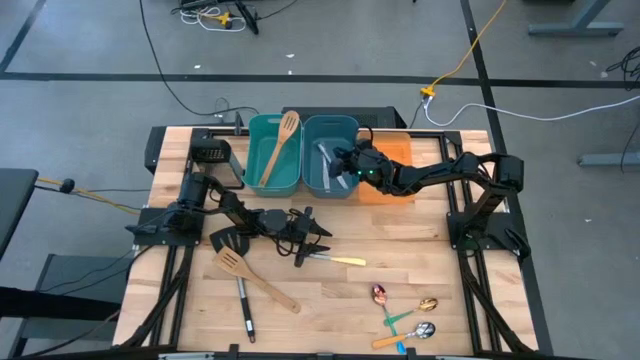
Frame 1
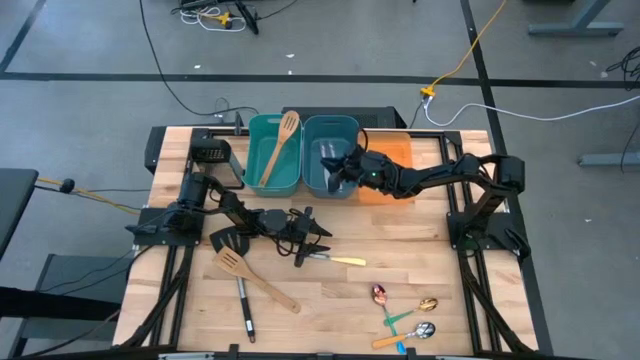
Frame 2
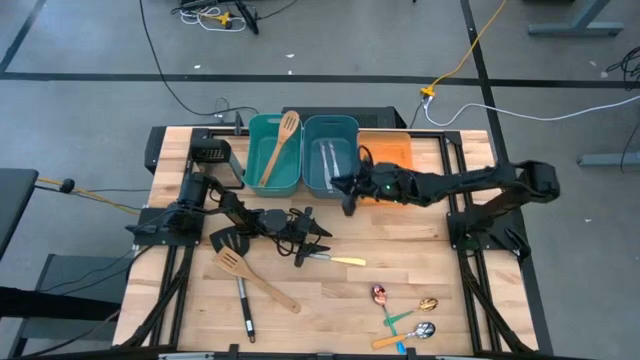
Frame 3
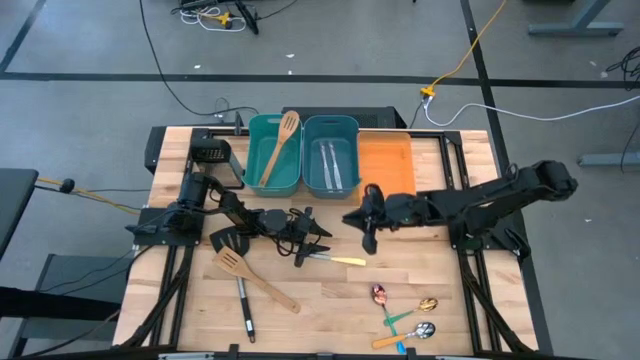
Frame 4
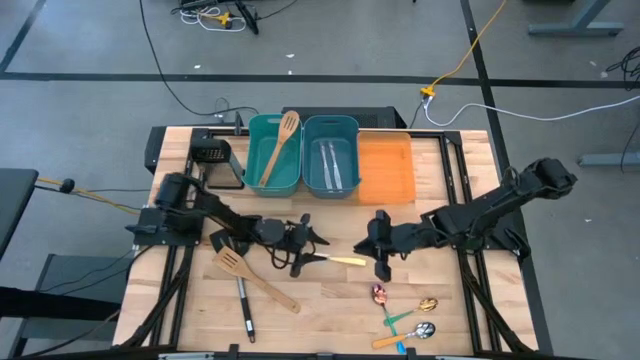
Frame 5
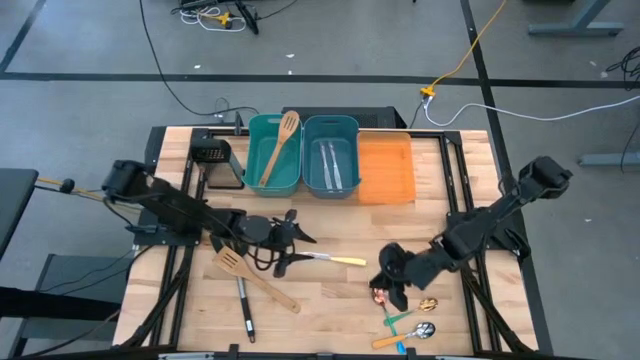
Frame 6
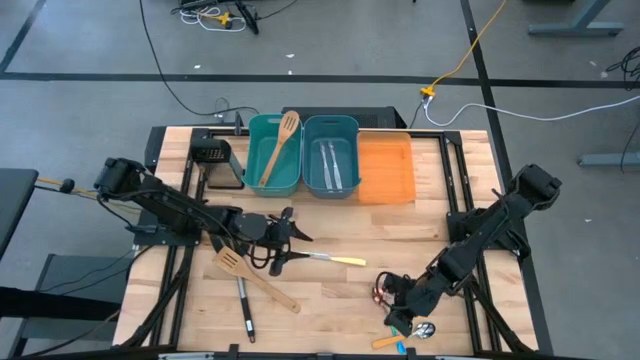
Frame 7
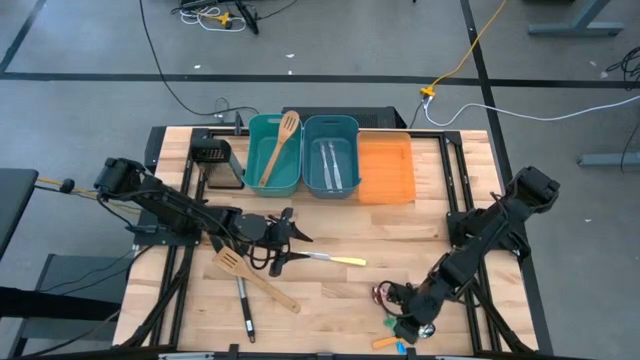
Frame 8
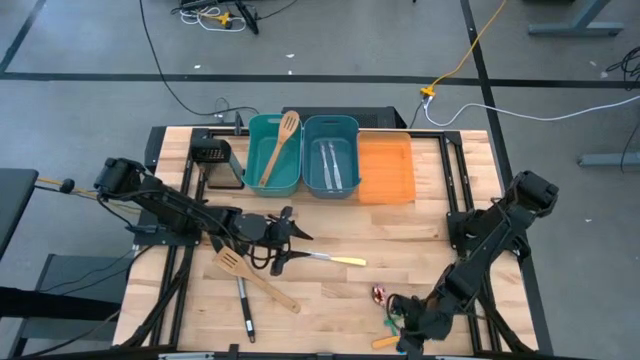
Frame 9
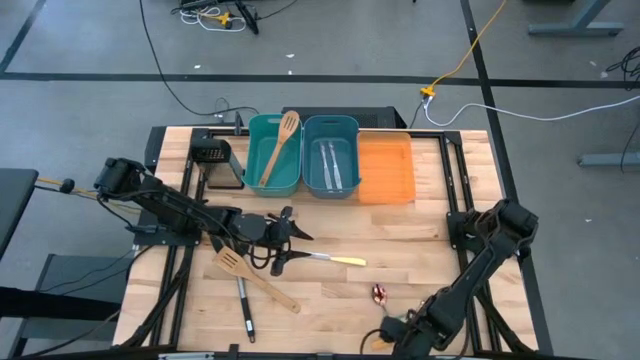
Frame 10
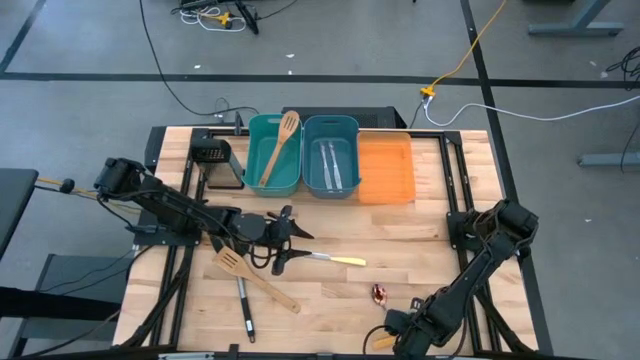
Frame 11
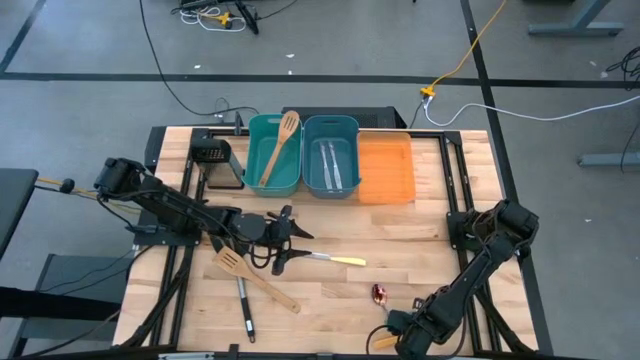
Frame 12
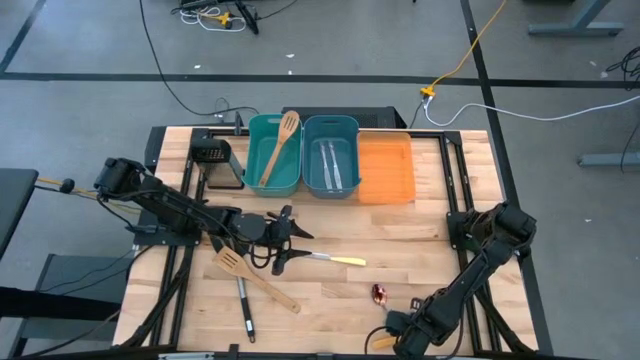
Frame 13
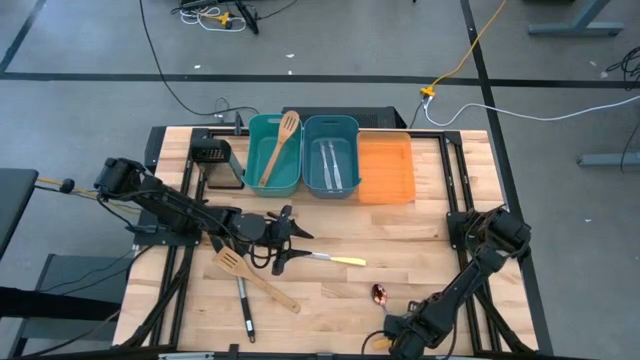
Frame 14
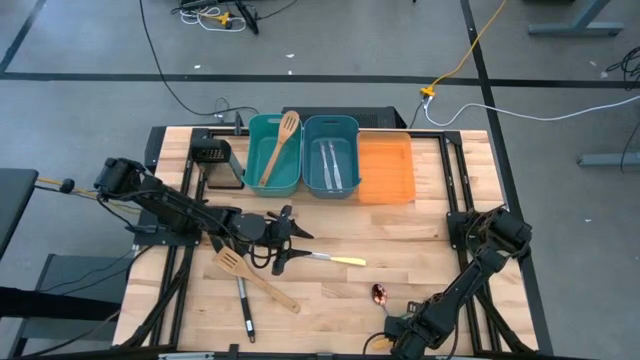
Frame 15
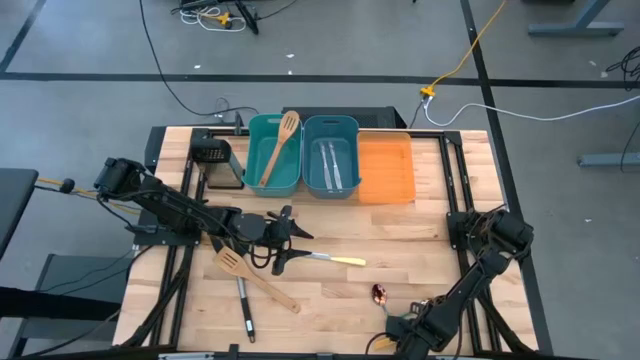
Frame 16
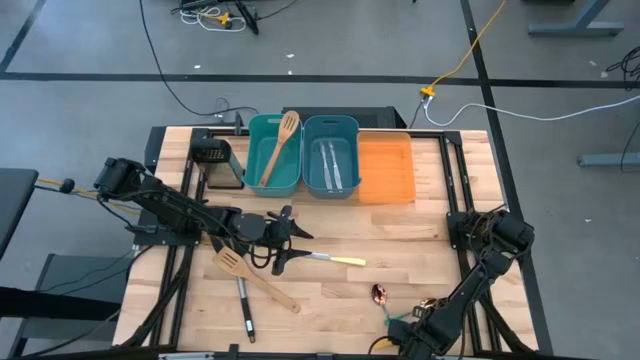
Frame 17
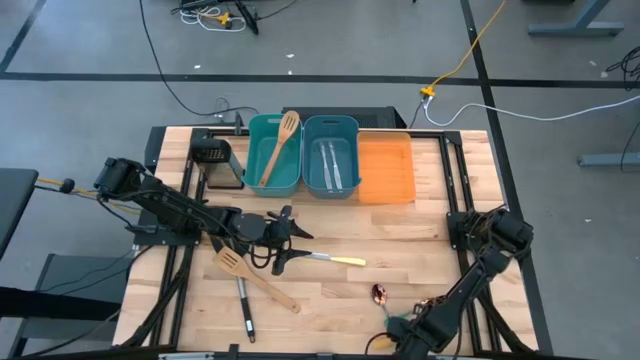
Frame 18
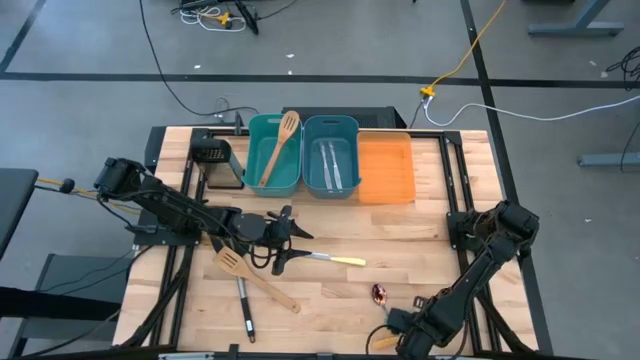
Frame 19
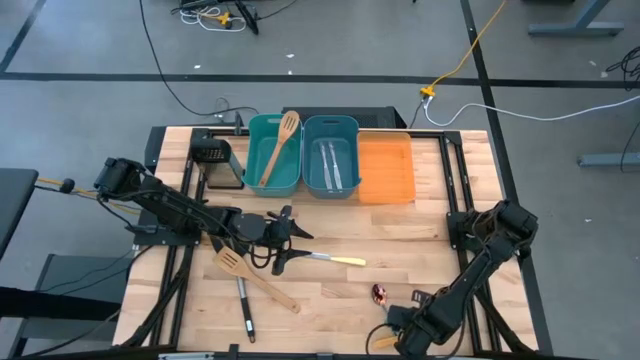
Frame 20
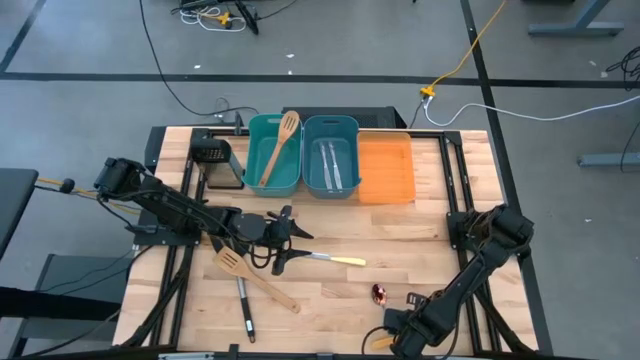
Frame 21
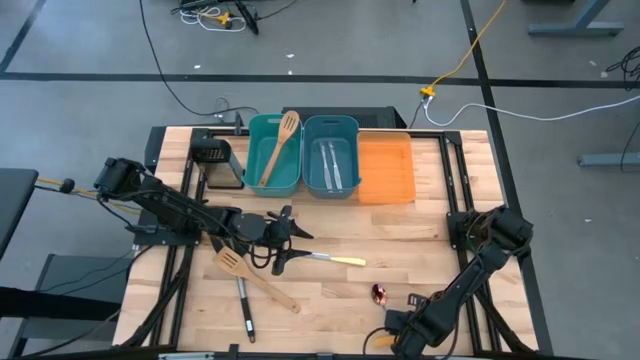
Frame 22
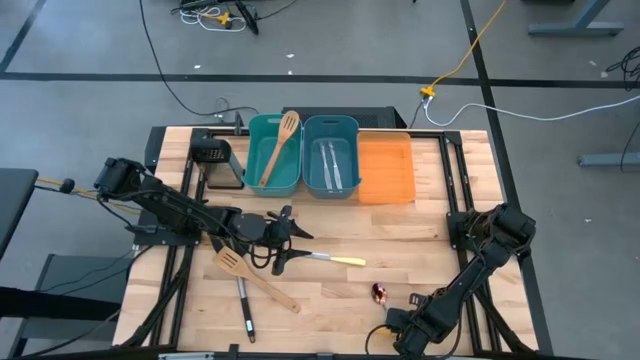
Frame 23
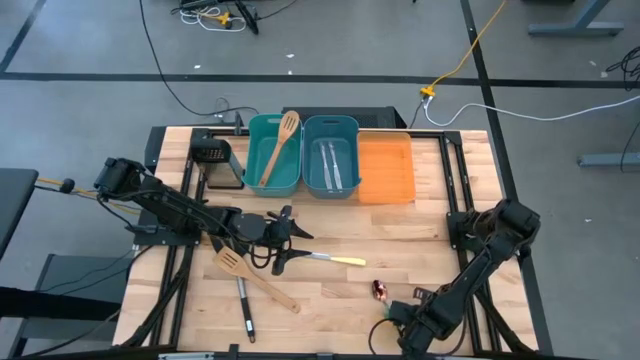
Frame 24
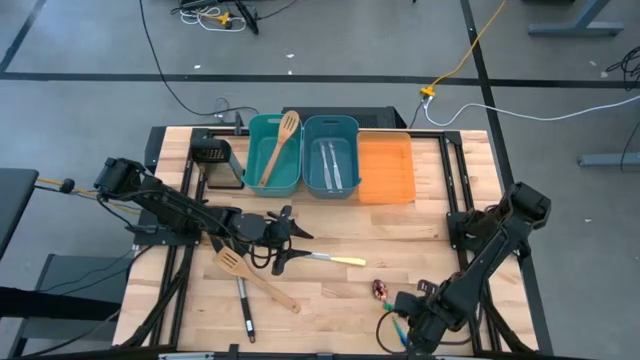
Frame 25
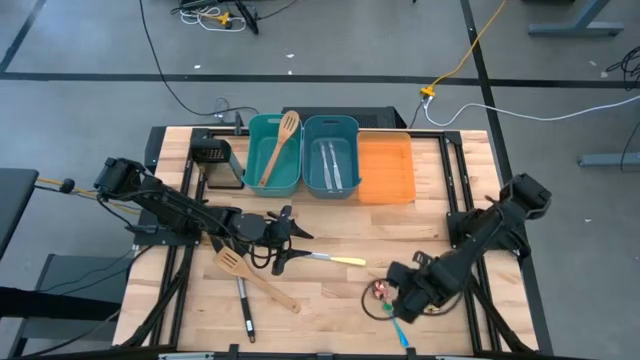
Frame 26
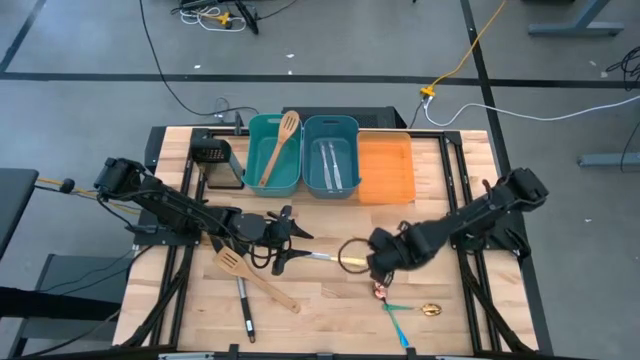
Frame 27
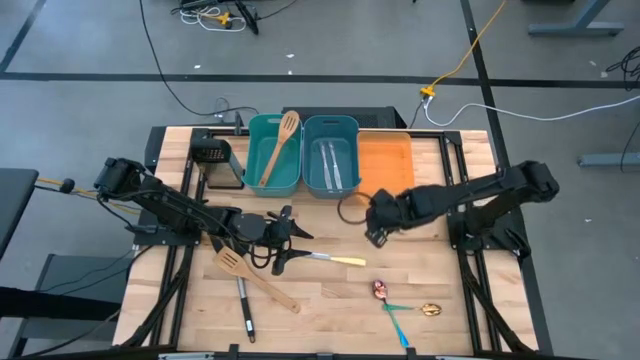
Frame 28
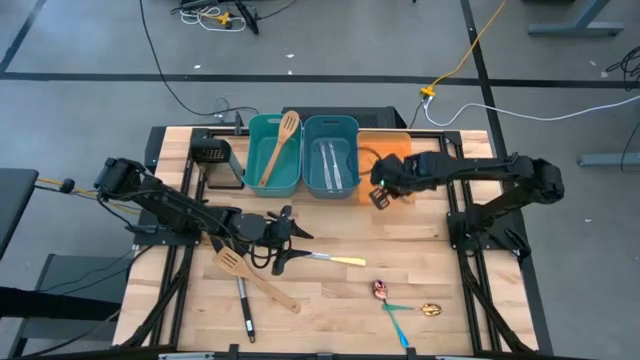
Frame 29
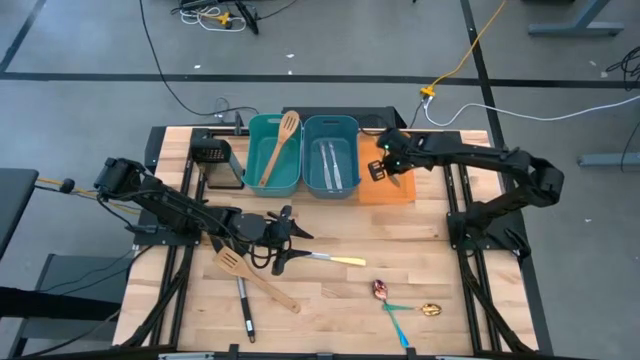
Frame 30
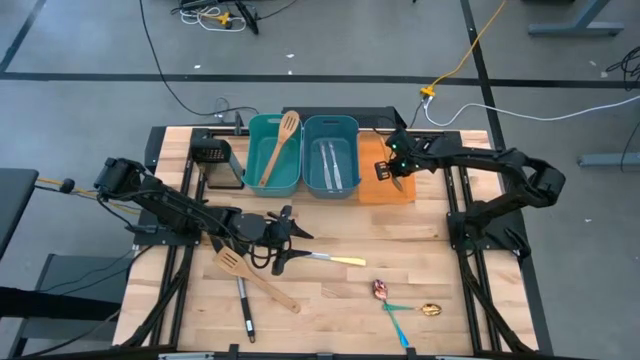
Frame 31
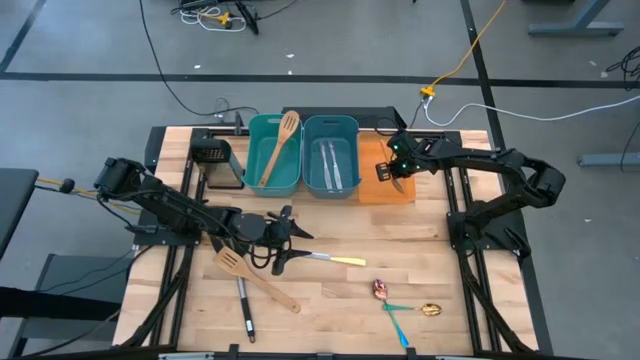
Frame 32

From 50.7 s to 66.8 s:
Task: Pick & Place Kitchen Items
Put the yellow spoon into the orange bin

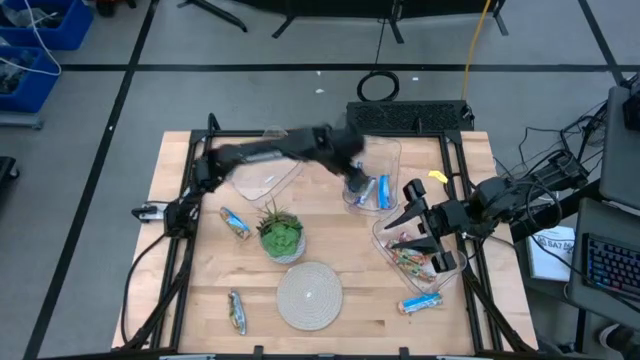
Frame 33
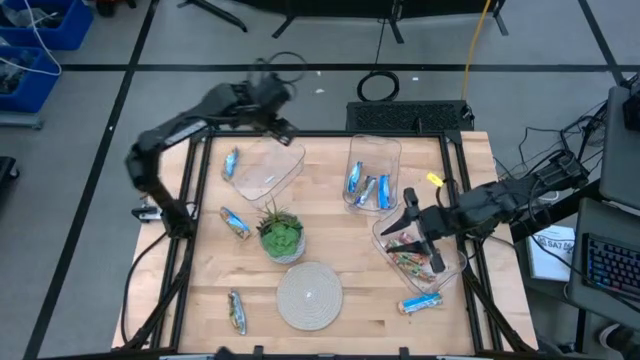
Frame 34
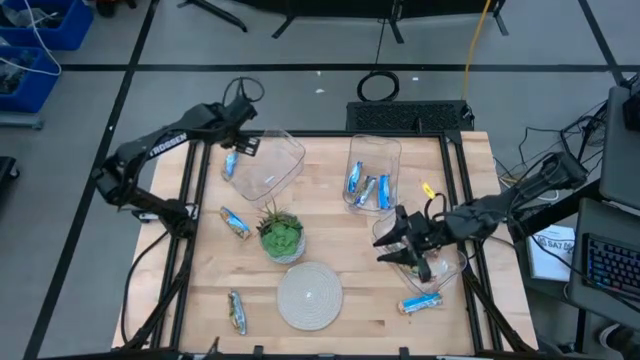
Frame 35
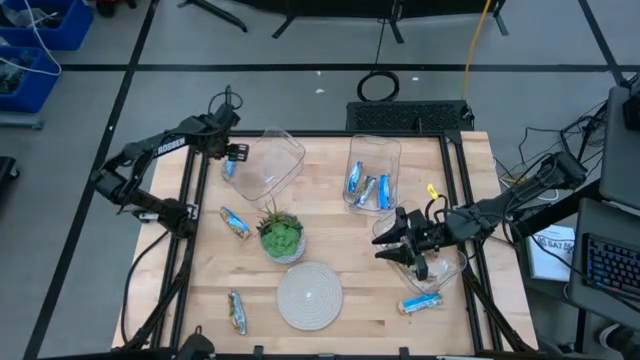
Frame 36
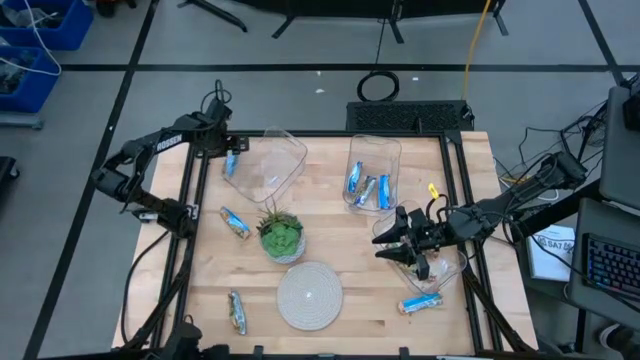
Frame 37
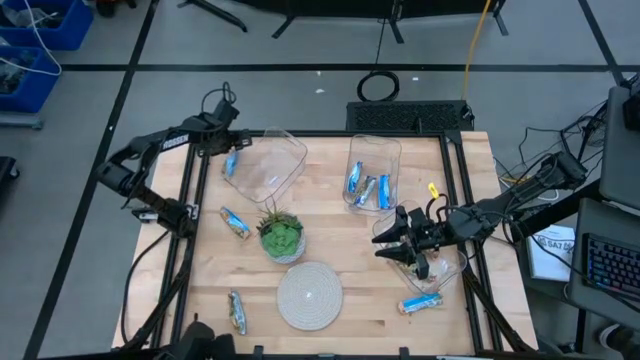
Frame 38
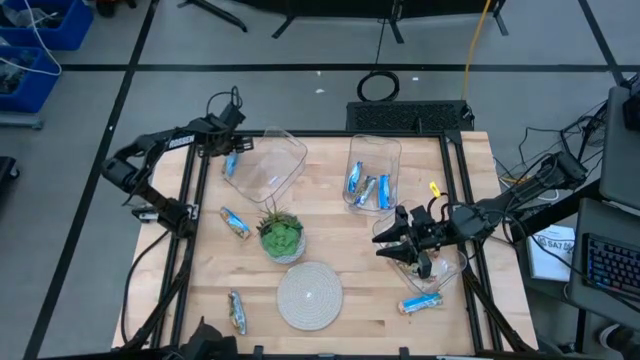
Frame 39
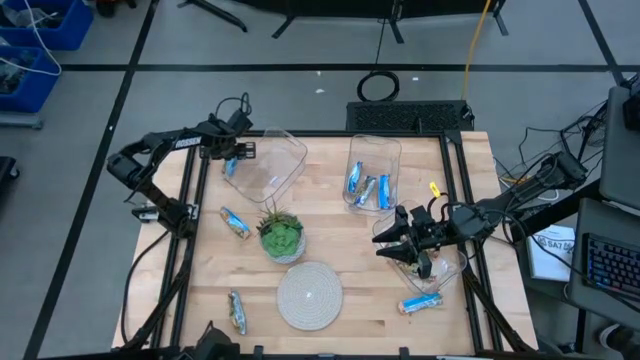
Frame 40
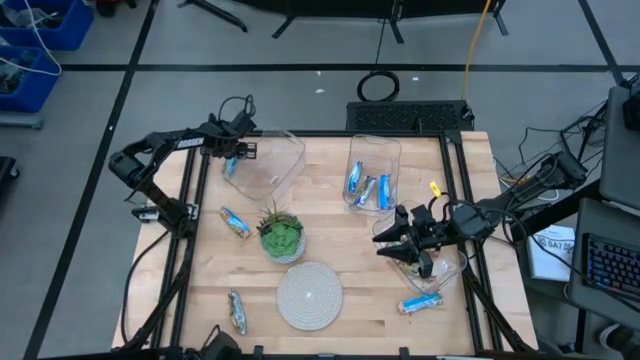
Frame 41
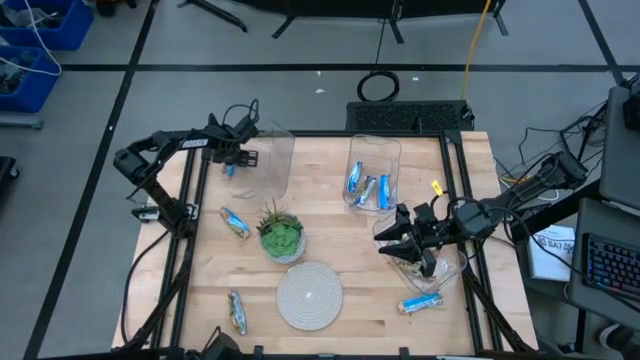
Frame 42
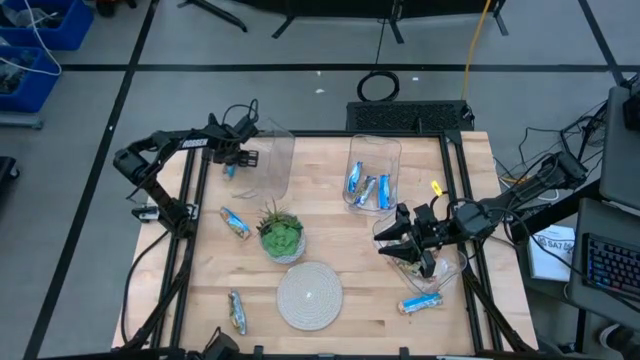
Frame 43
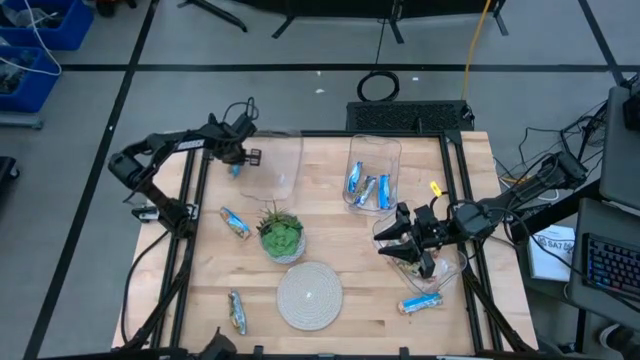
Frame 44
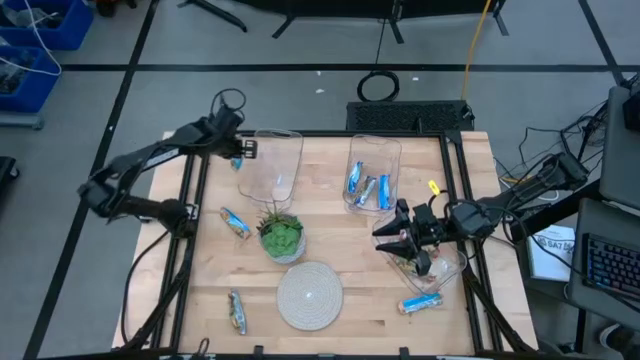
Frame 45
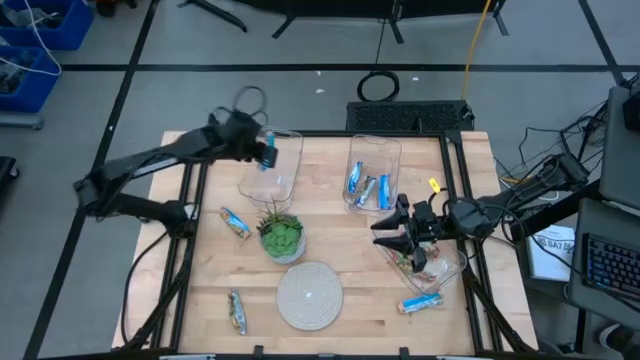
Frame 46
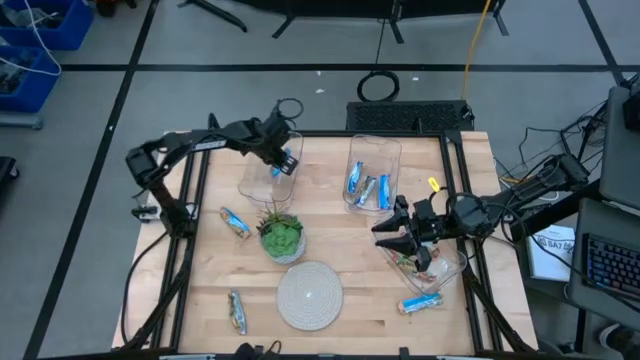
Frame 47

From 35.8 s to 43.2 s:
Task: Pick and place Granola Bars by type
Put the yellow granola bar into the top left transparent bin
